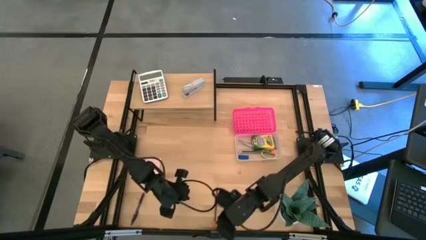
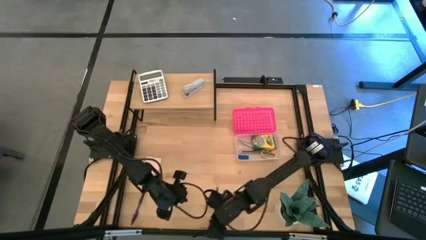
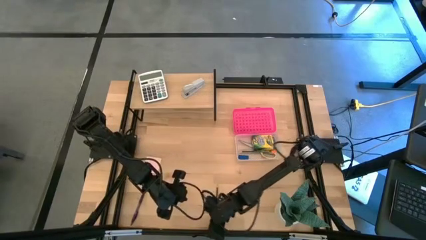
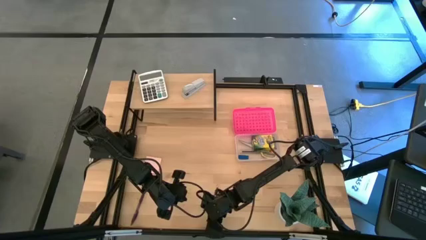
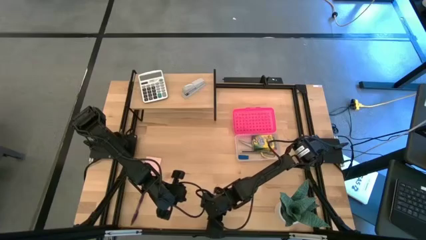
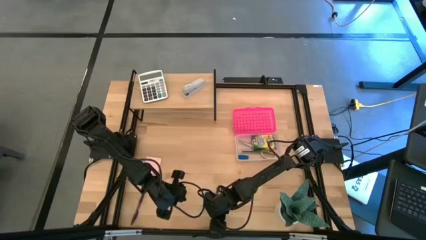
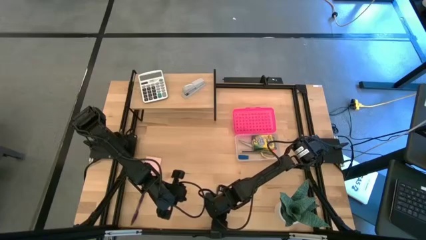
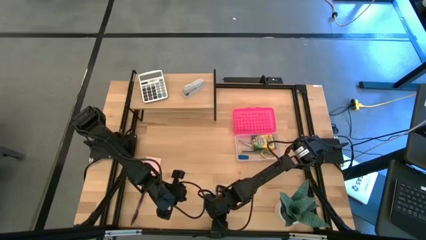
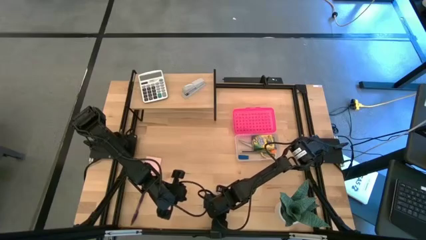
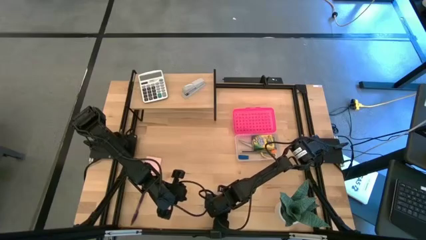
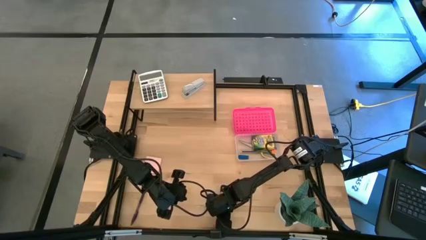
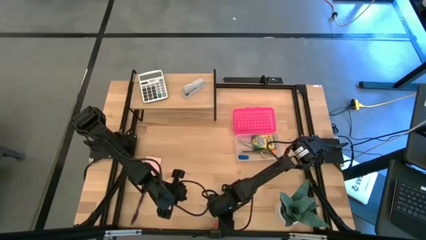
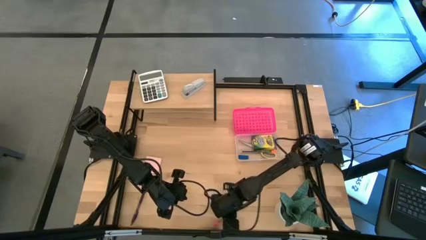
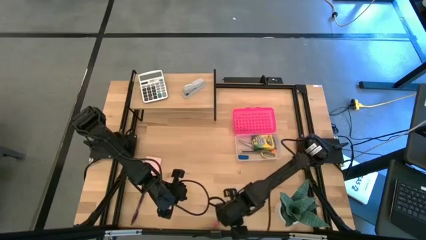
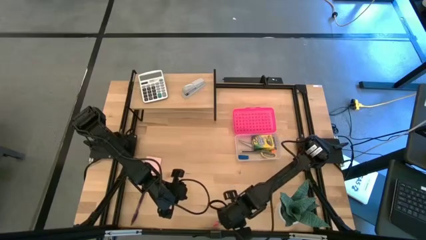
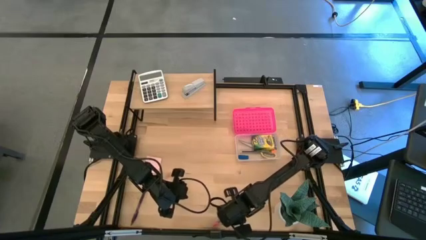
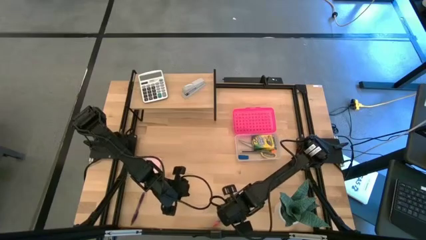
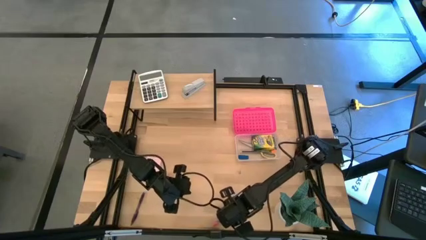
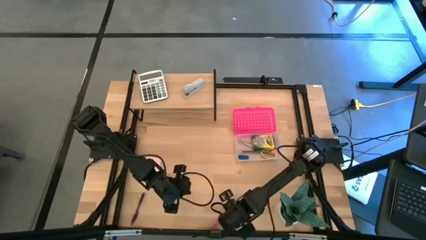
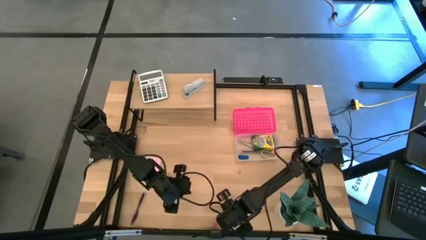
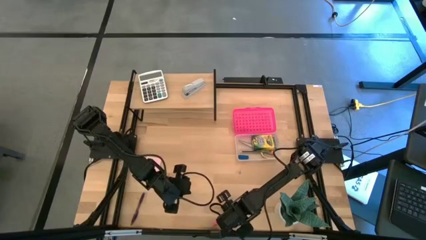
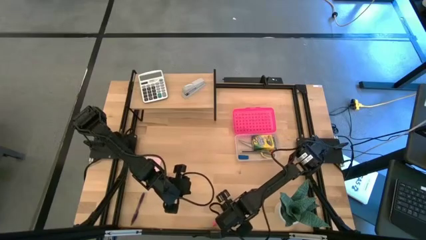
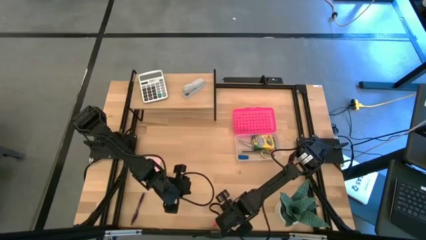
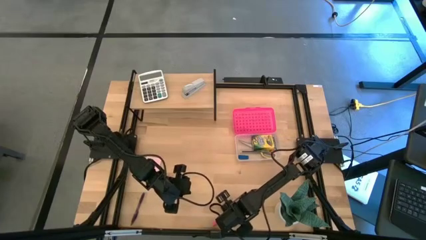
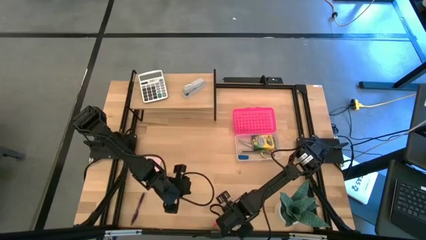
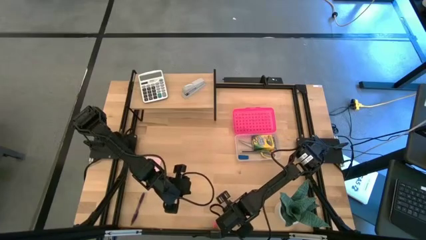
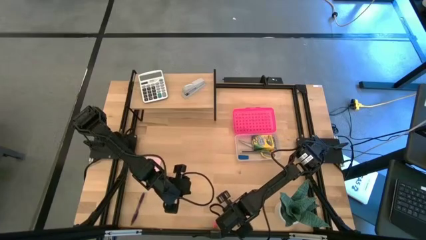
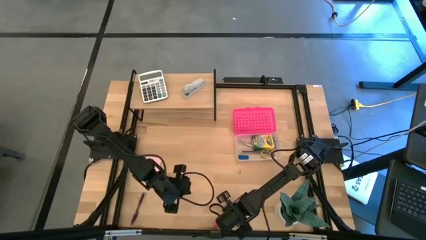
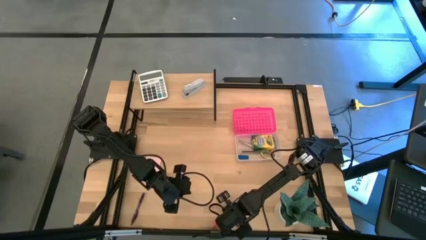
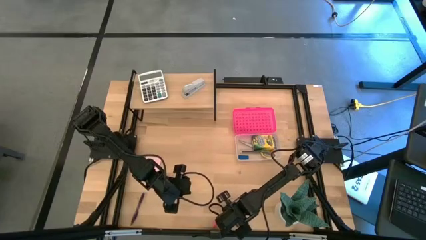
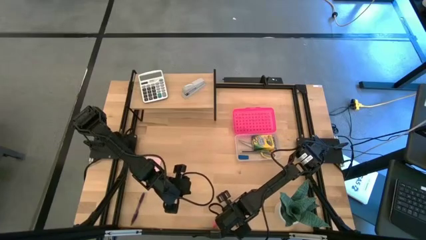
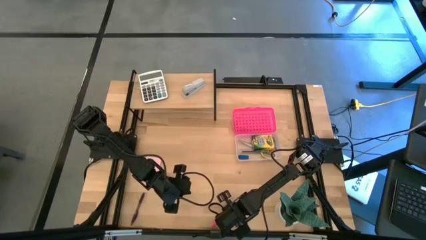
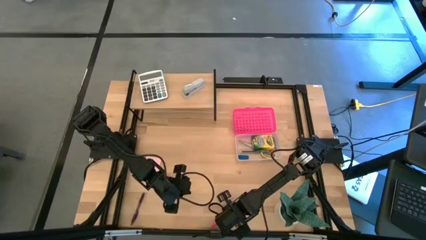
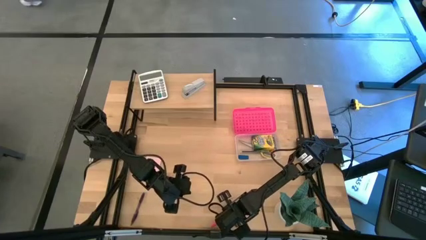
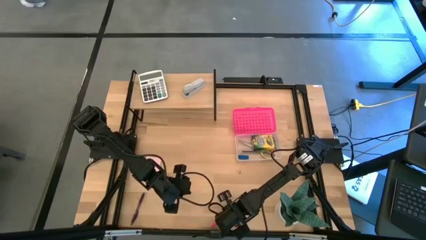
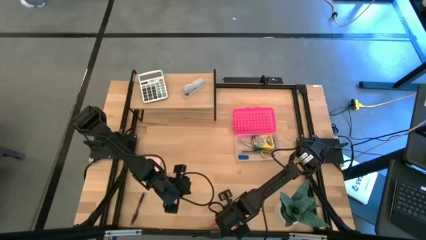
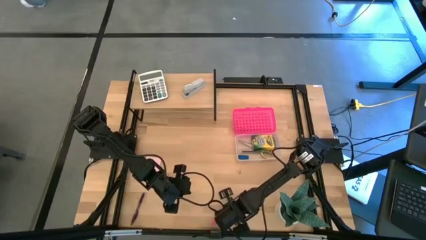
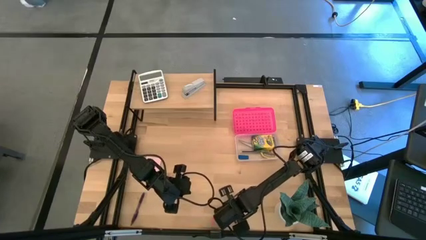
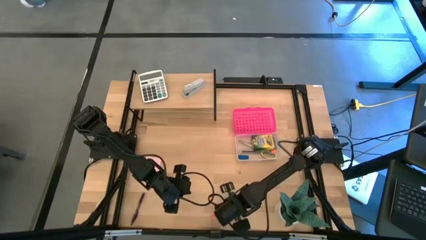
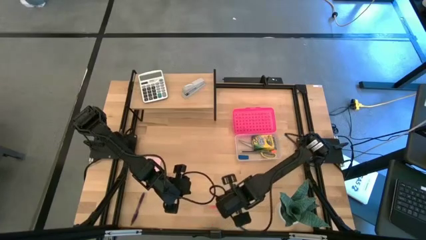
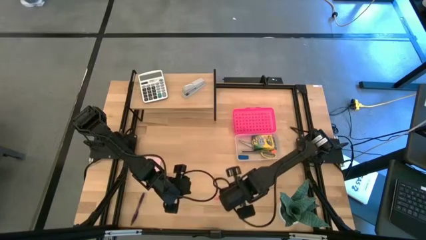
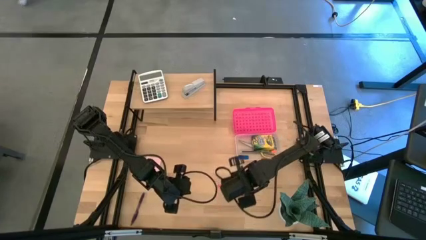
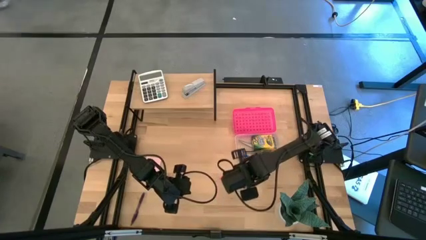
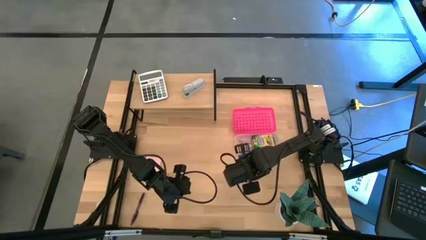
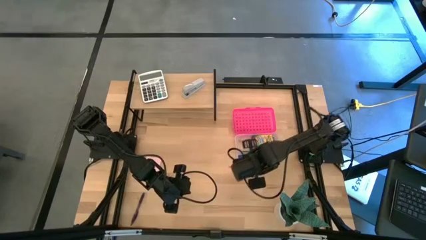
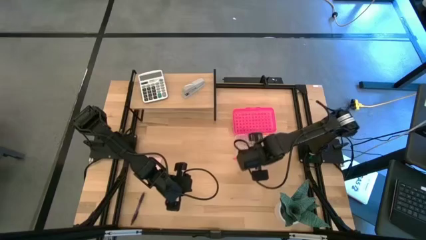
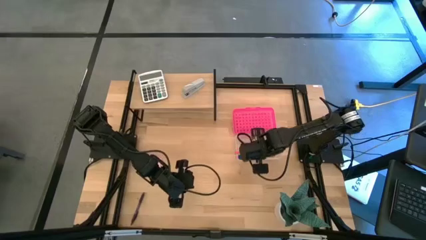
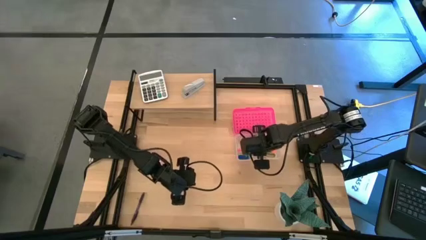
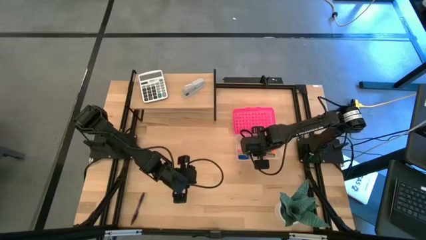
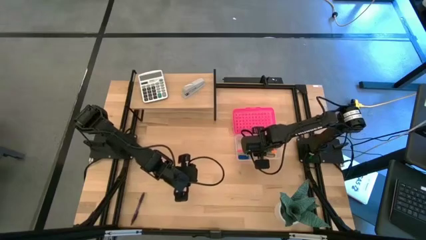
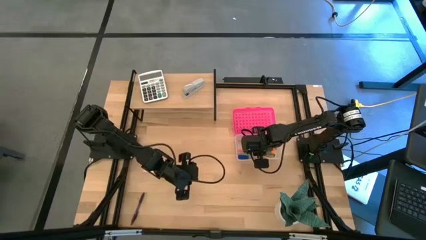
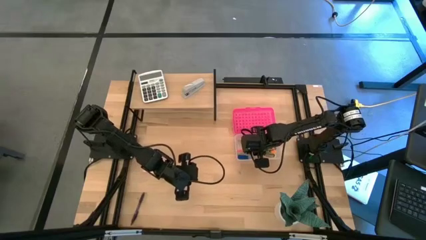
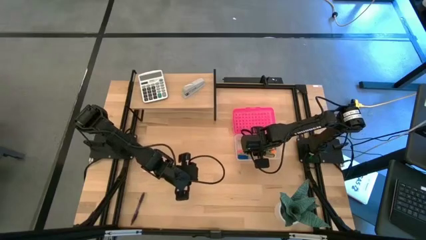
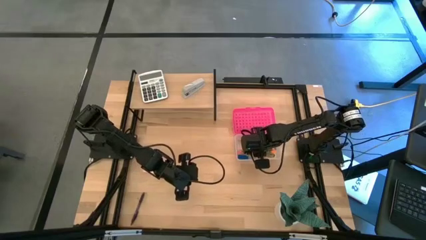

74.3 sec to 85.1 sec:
Task: Pack school essentials
Put the pink pencil into the pink supply box

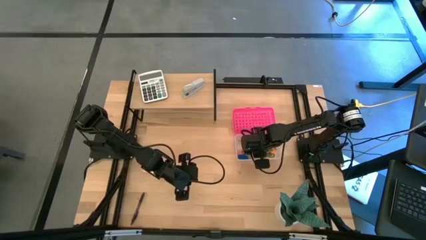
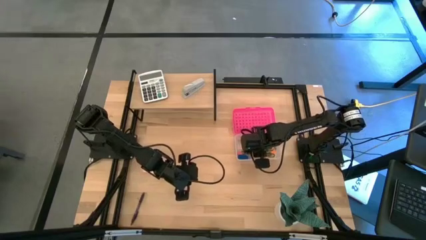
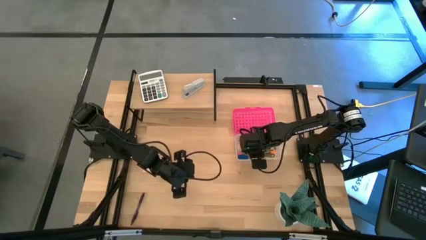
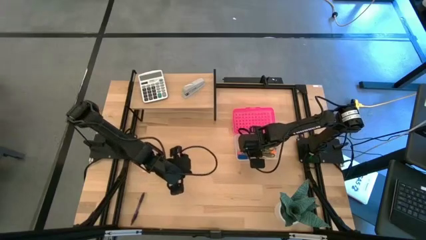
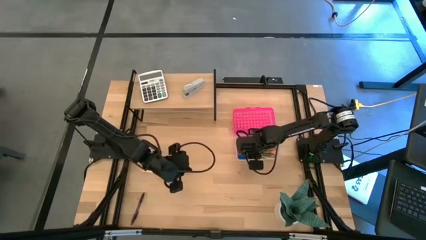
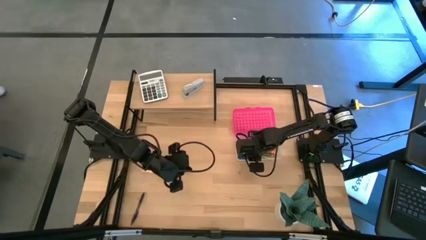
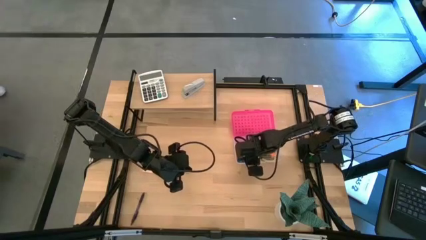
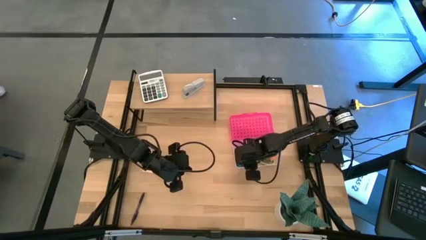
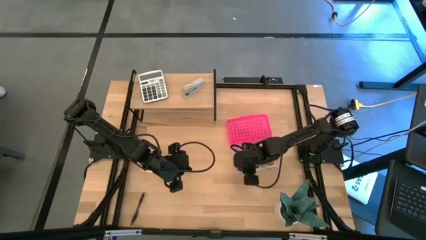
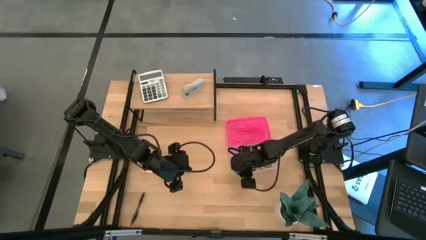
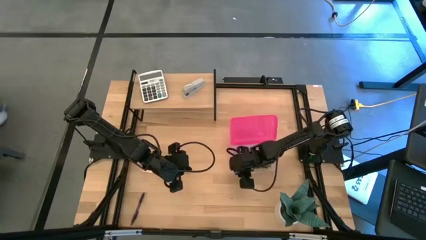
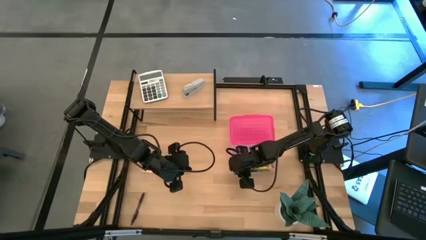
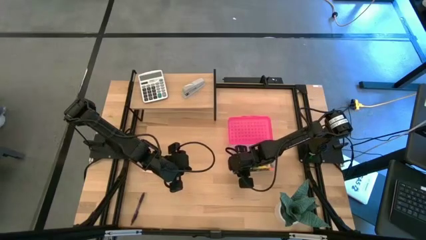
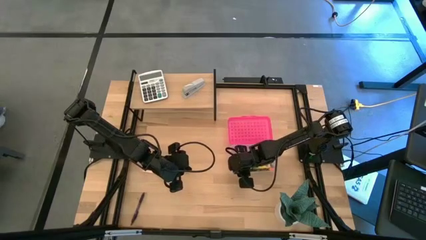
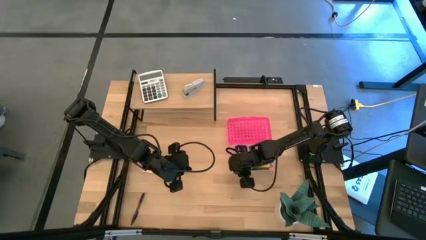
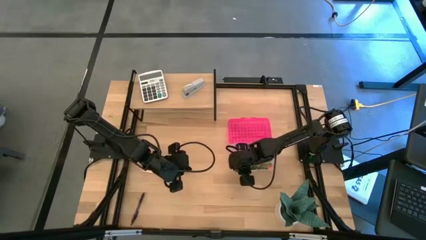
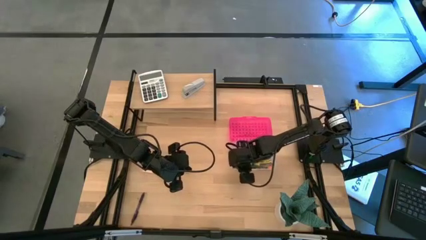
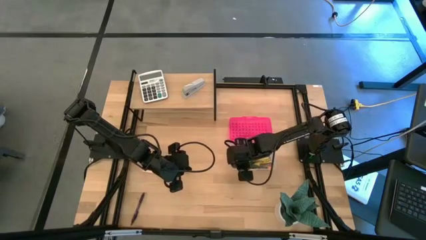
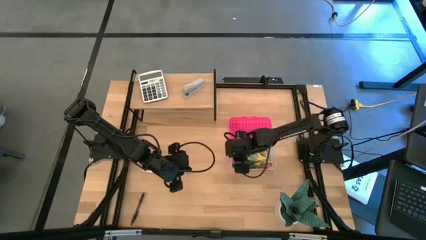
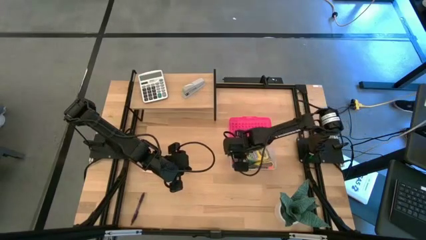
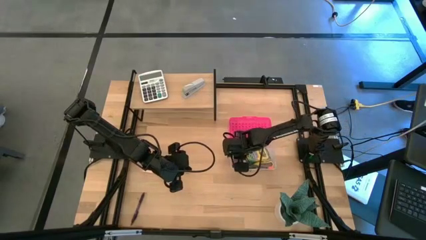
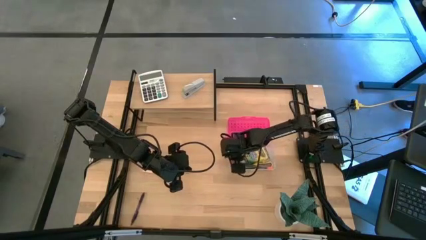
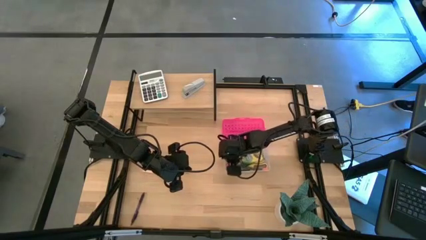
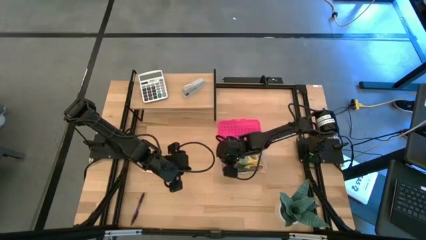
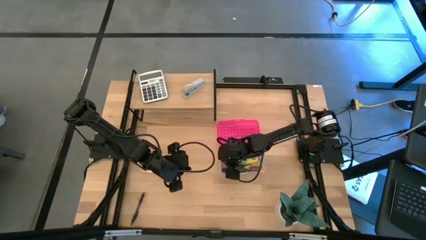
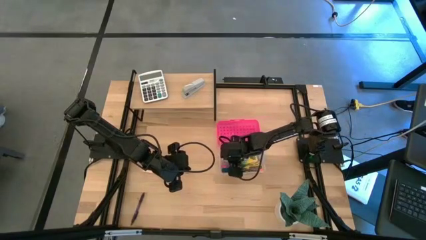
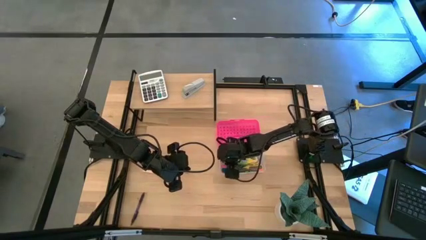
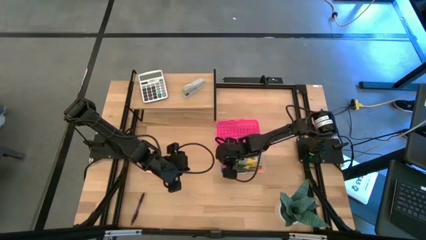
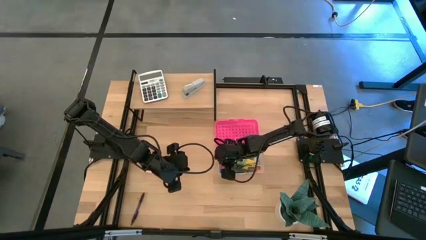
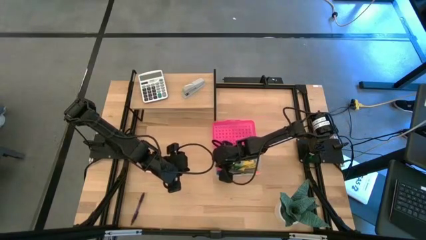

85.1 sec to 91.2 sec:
Move the pink supply box to the center of the table
